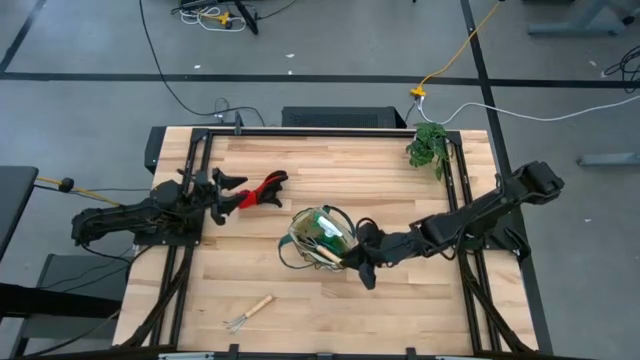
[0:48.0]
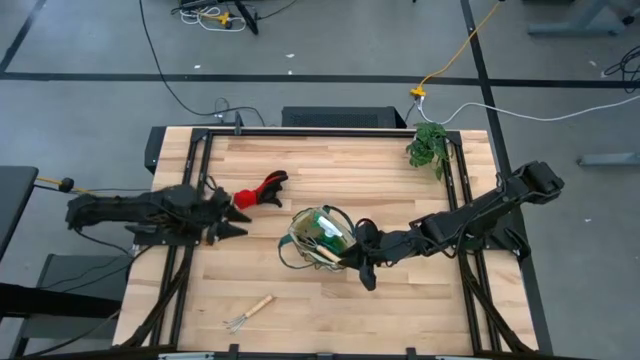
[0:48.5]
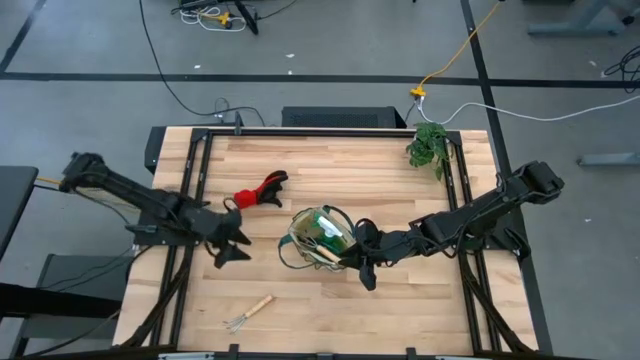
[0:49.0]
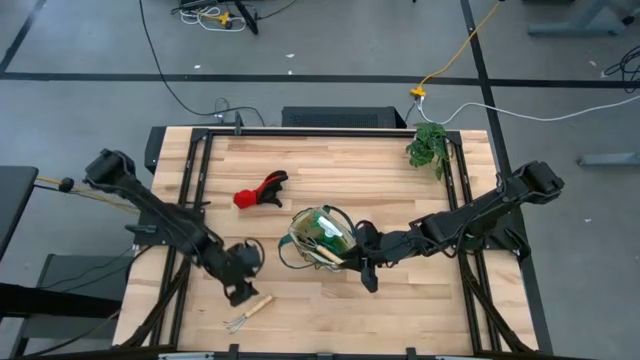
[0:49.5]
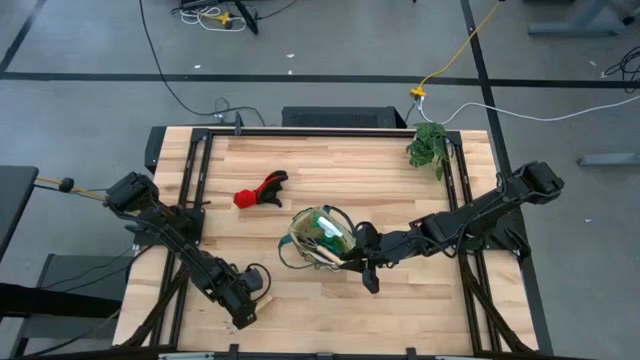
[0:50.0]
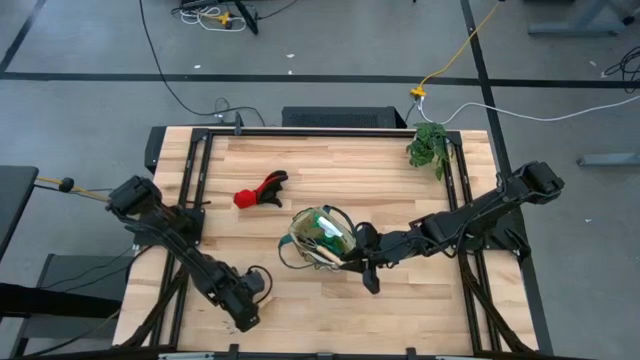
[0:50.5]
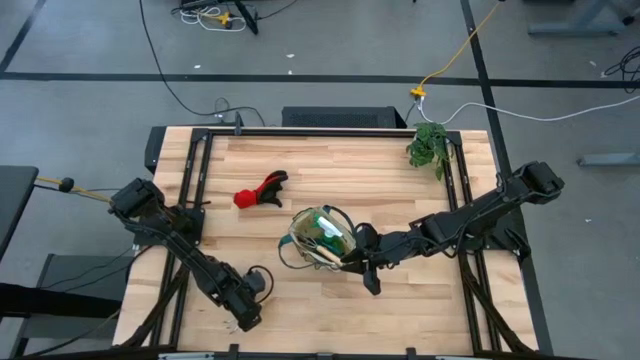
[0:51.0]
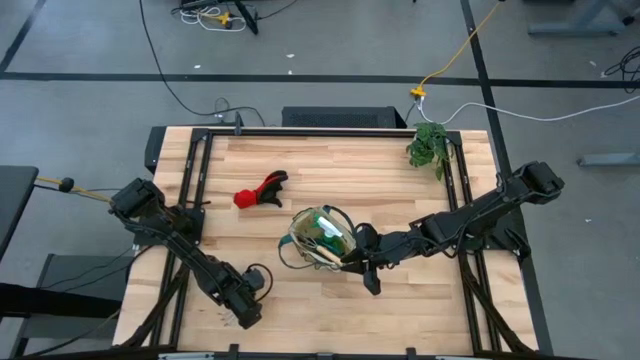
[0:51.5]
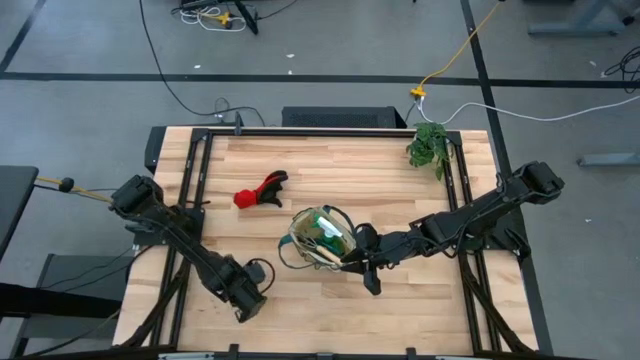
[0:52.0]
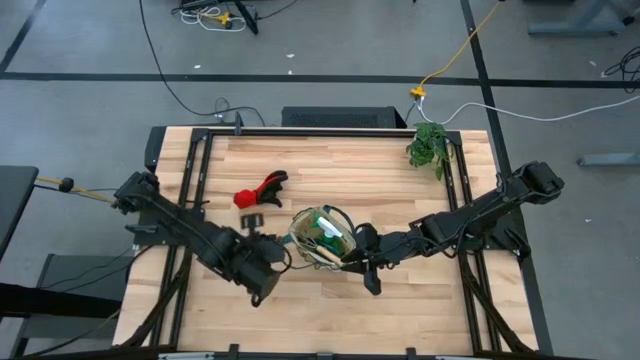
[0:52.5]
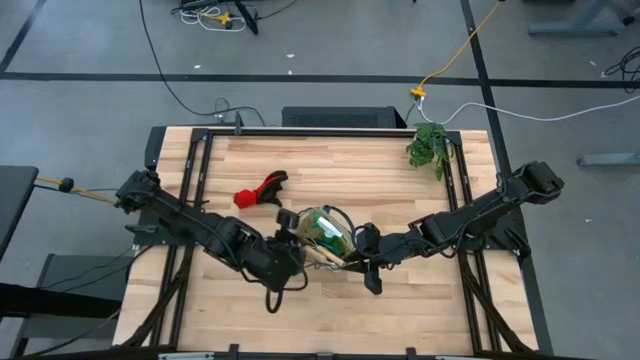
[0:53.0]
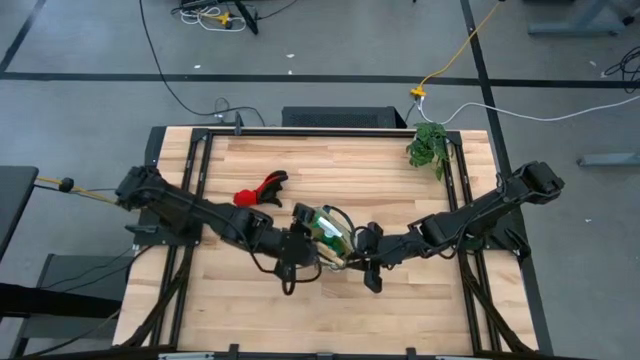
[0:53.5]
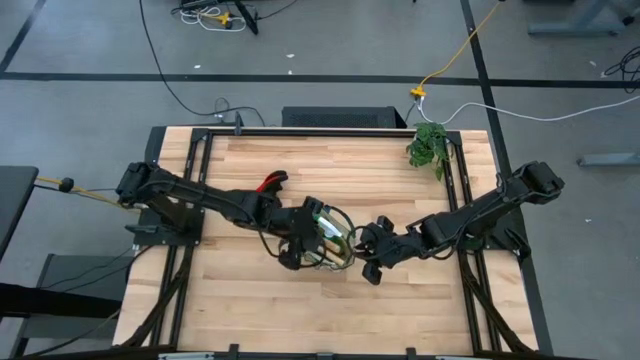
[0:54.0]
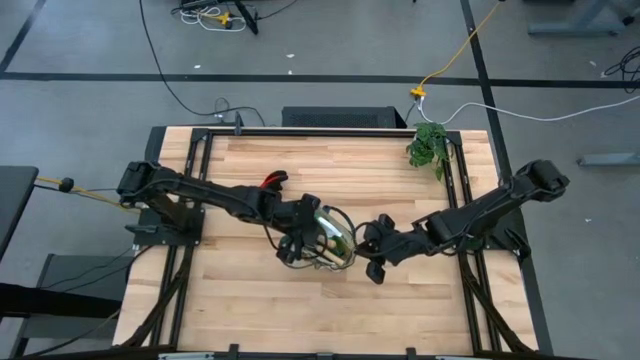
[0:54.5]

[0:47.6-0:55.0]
Task: Pick & Place Garden tools in Gardening bag
Put the light brown rake into the white bag

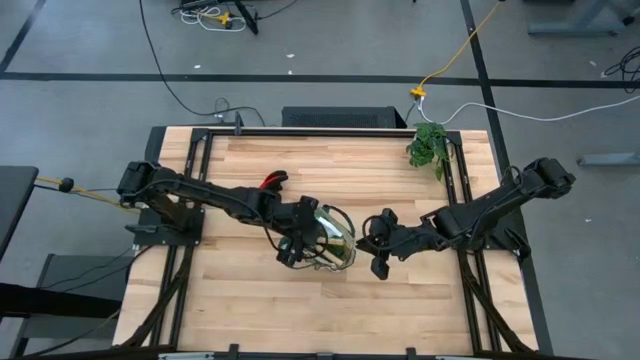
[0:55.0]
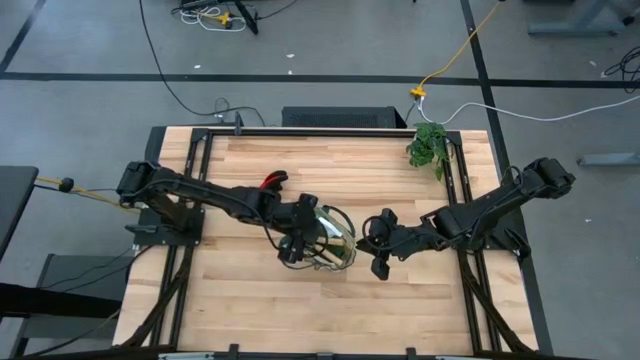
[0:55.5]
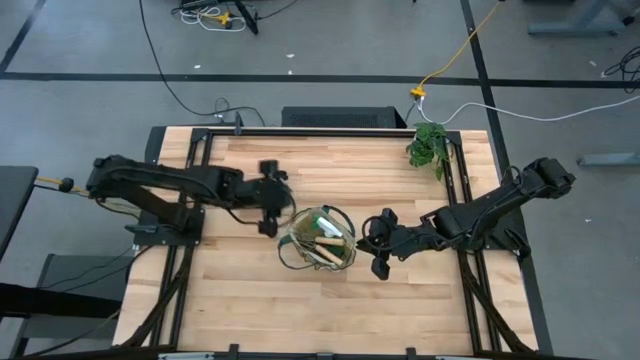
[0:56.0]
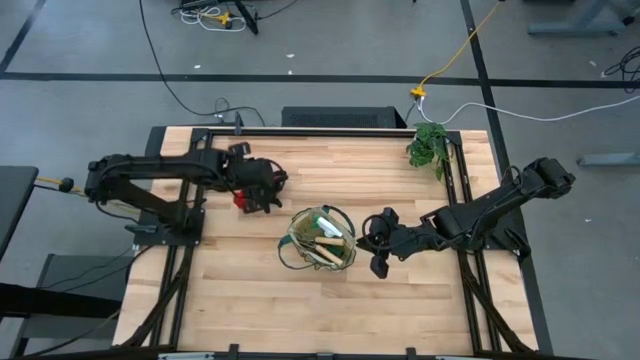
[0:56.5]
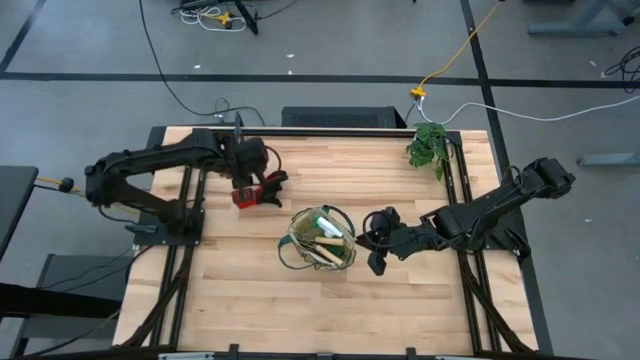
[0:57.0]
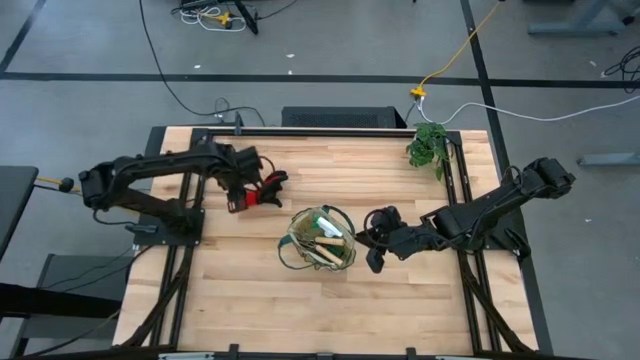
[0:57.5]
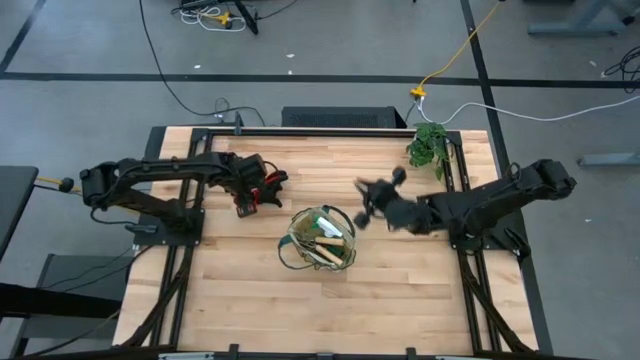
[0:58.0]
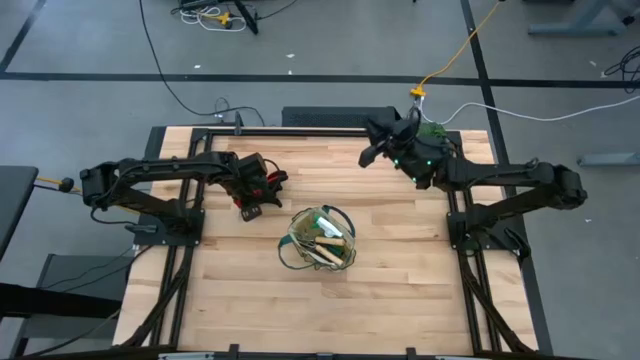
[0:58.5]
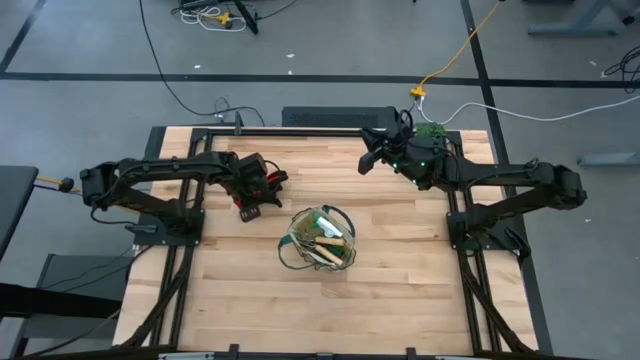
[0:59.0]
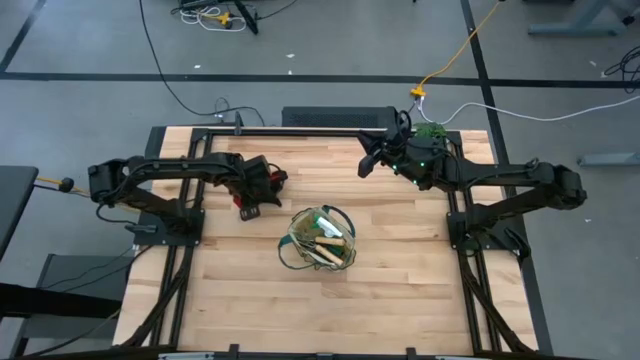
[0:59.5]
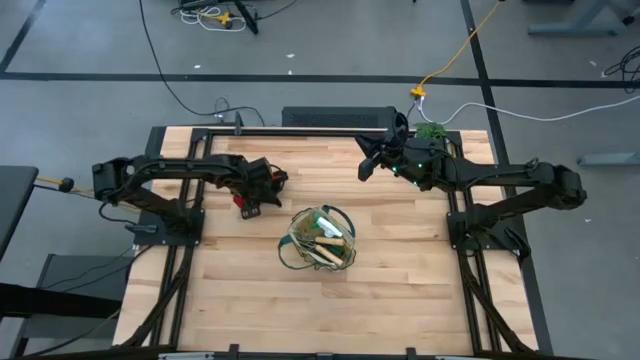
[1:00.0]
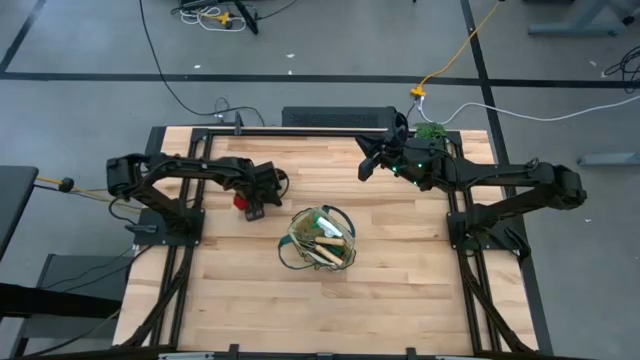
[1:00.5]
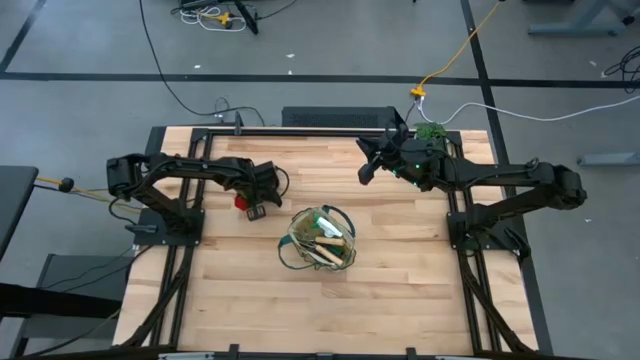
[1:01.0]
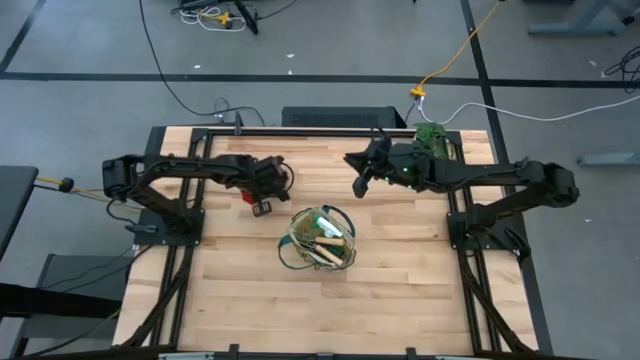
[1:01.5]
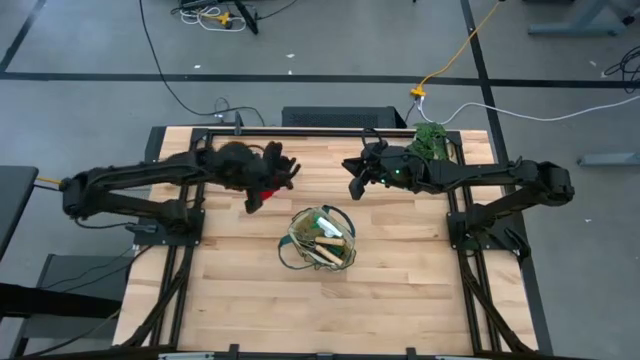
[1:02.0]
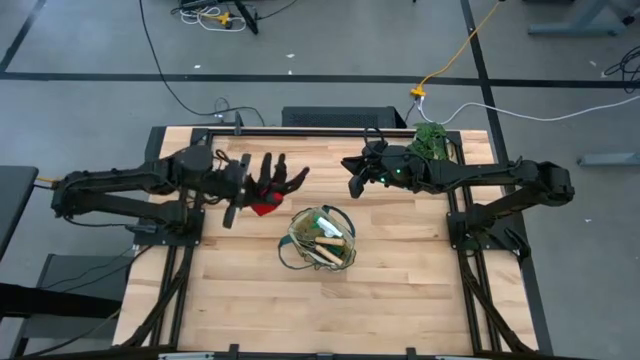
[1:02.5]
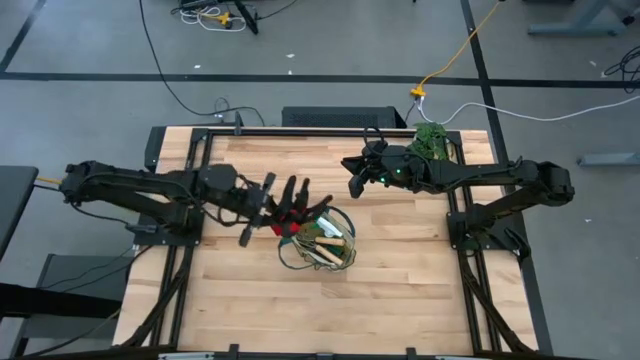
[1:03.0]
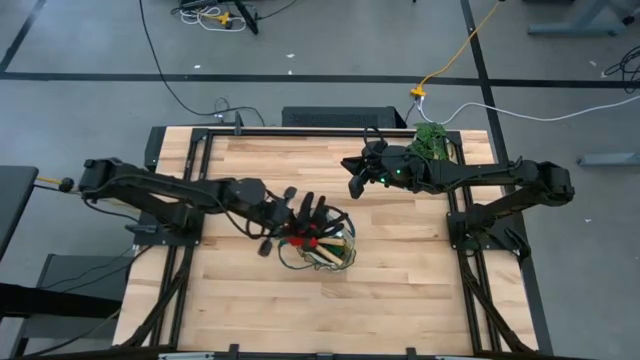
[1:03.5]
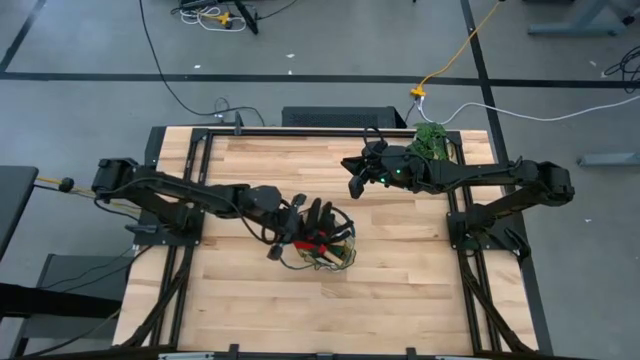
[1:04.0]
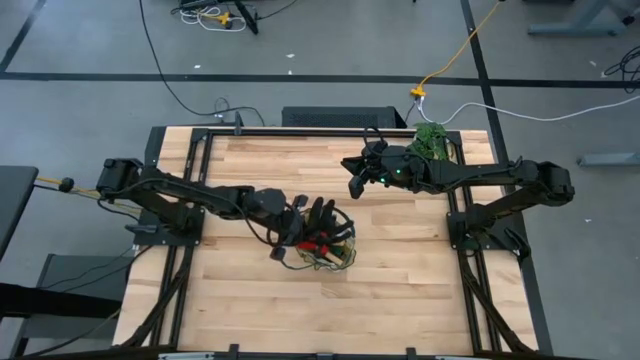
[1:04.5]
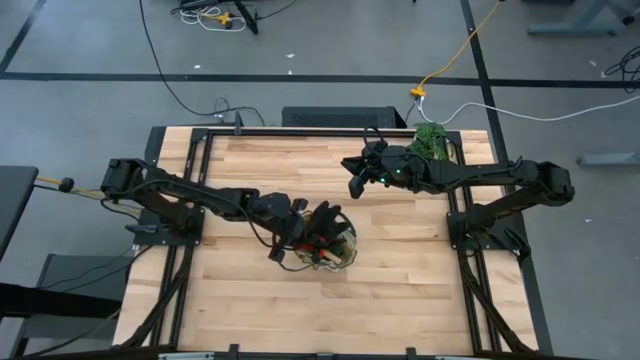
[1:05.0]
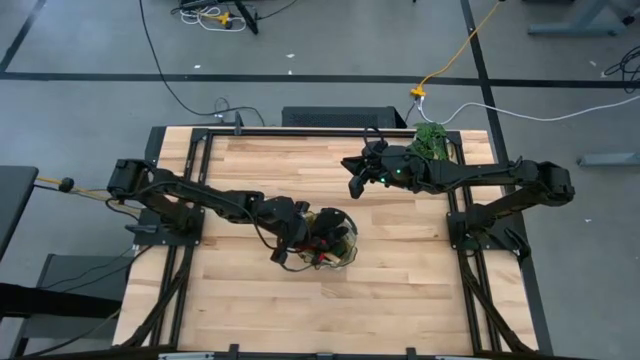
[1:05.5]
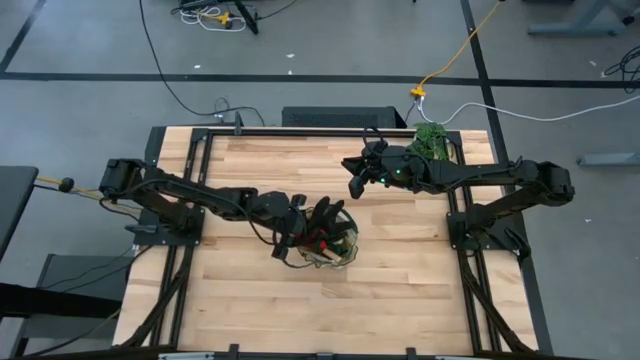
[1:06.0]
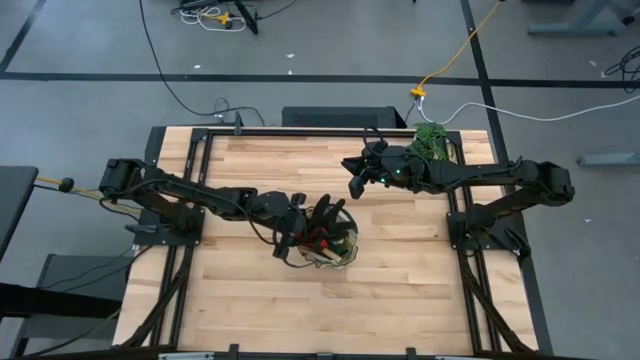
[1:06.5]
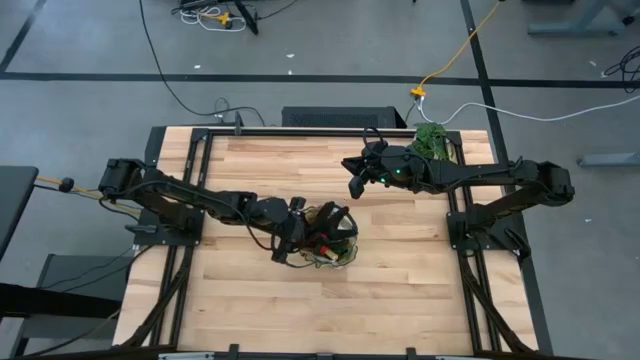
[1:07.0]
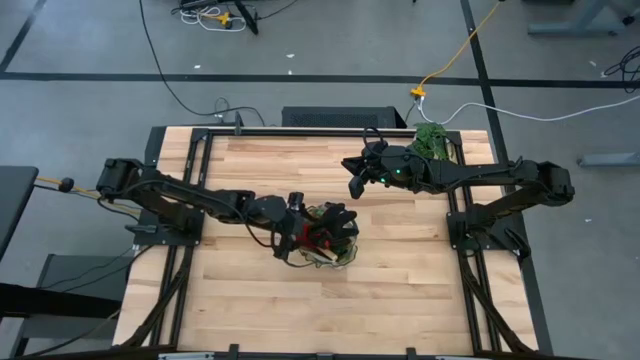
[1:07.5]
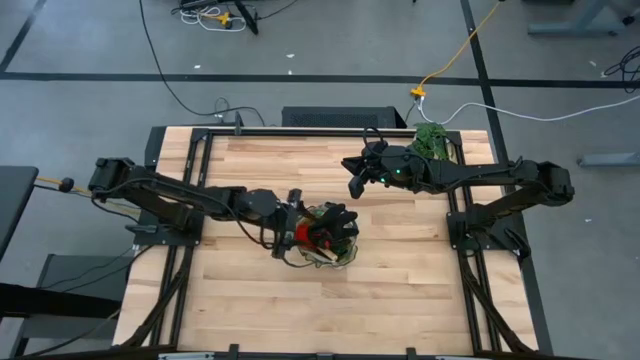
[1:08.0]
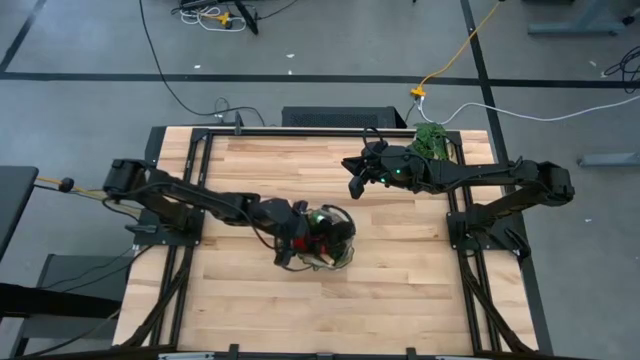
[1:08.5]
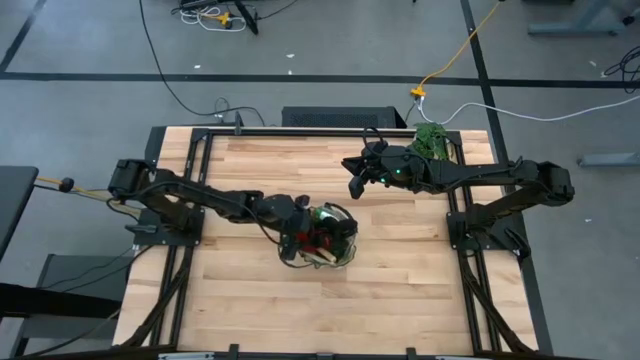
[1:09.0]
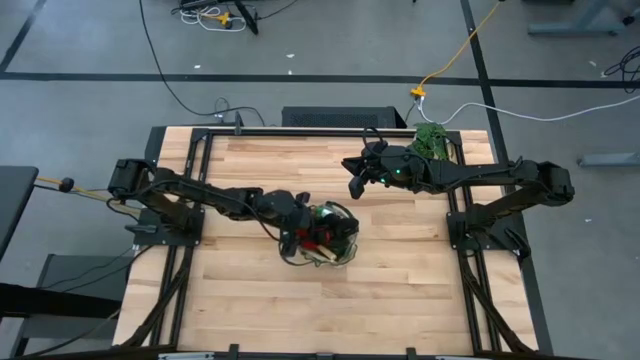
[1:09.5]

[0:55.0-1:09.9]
Put the red gloves into the white bag

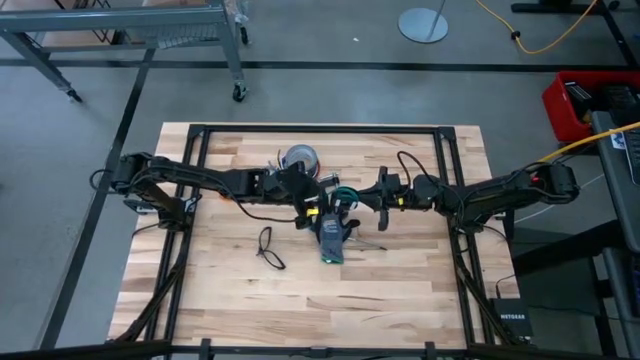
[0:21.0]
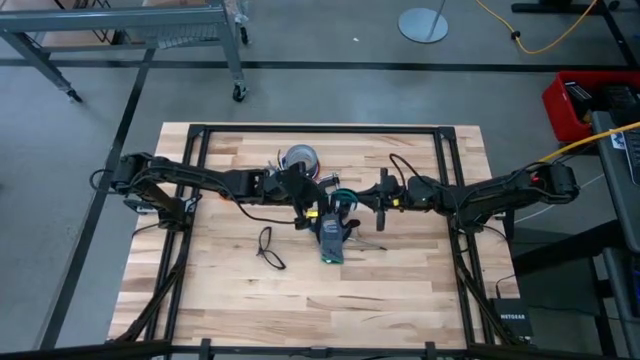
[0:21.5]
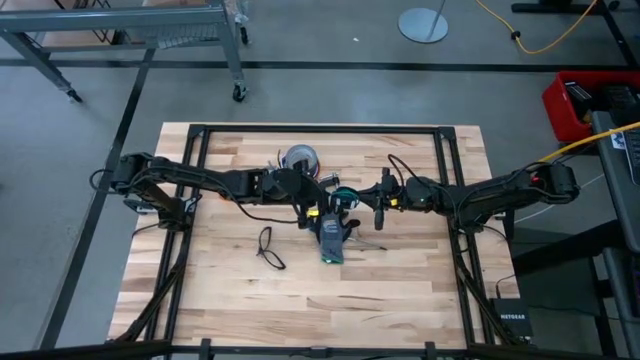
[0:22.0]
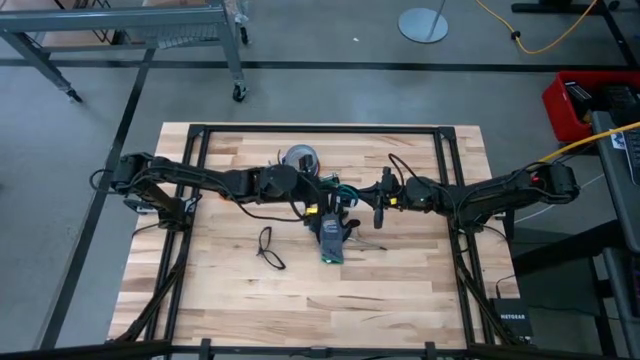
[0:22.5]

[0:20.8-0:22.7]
Task: Coil cords
Uncoil the green wire from the black spool
